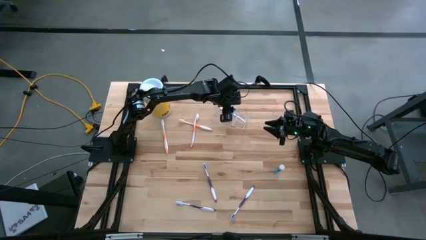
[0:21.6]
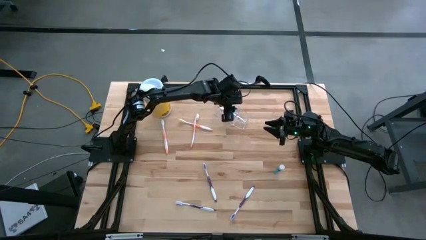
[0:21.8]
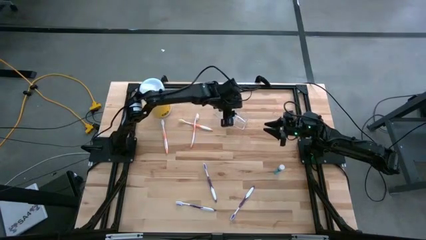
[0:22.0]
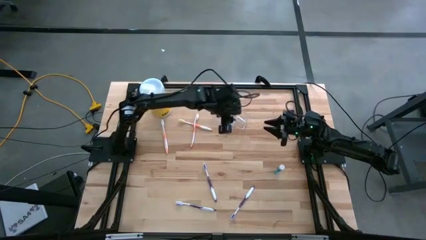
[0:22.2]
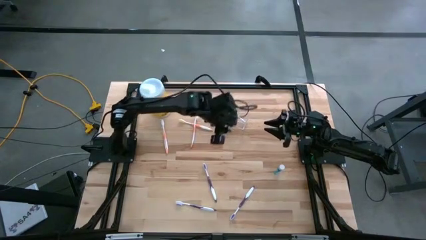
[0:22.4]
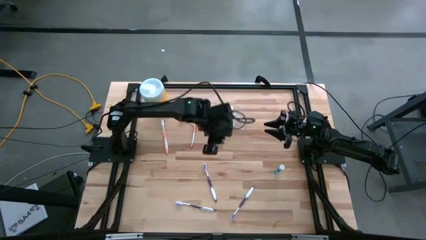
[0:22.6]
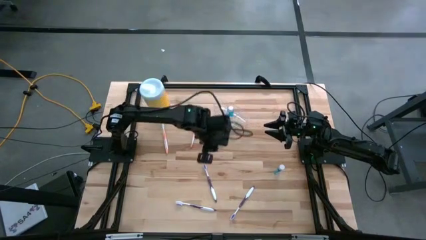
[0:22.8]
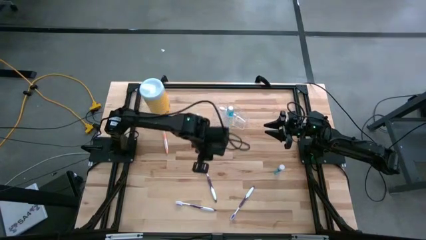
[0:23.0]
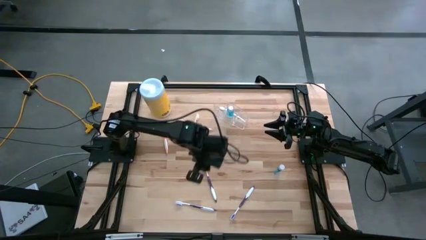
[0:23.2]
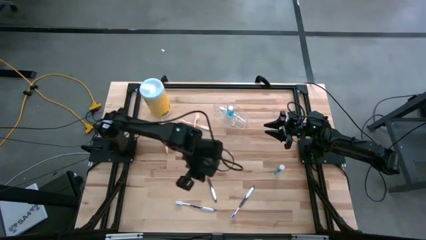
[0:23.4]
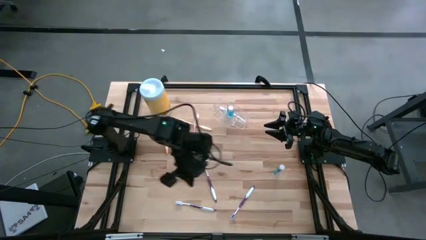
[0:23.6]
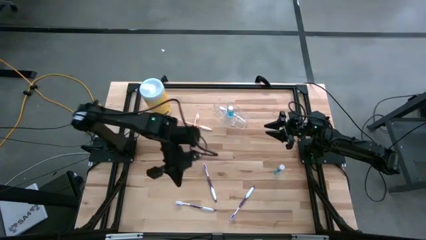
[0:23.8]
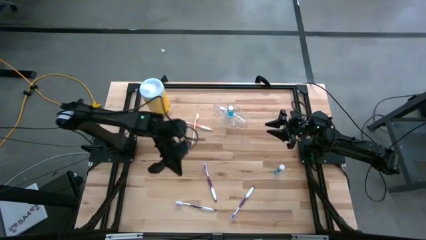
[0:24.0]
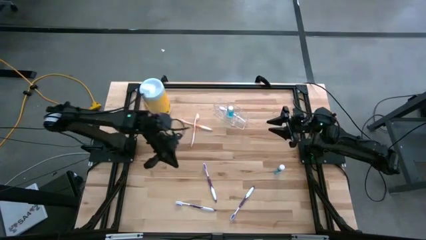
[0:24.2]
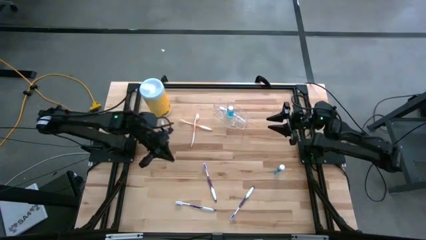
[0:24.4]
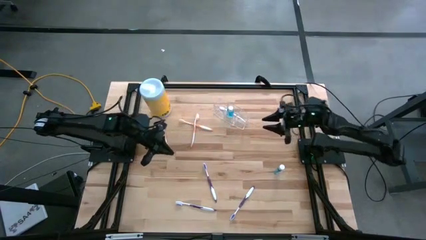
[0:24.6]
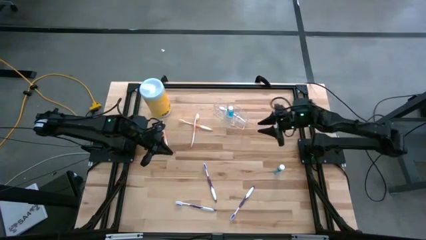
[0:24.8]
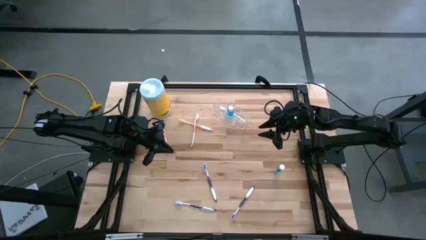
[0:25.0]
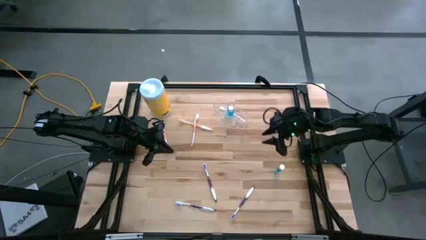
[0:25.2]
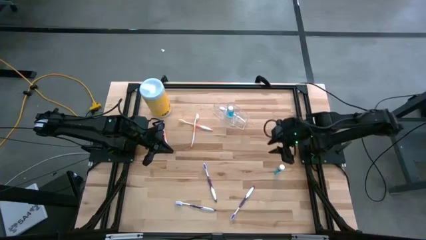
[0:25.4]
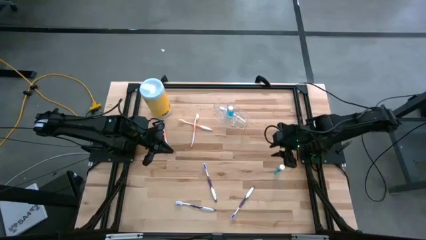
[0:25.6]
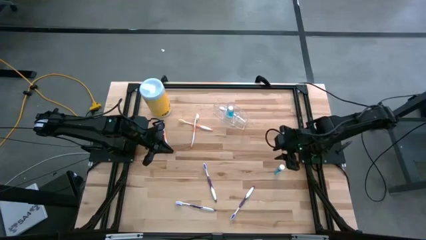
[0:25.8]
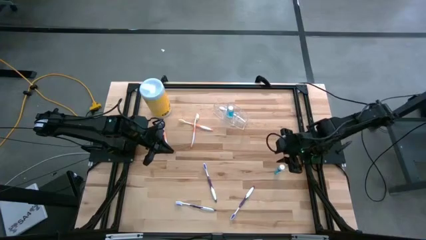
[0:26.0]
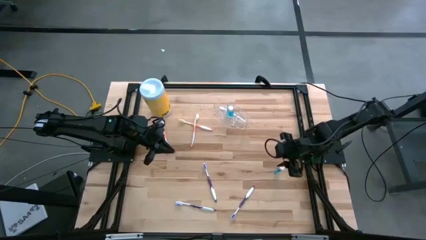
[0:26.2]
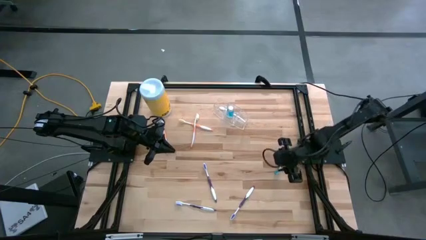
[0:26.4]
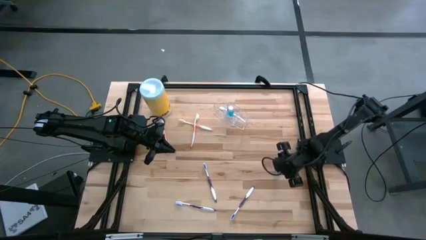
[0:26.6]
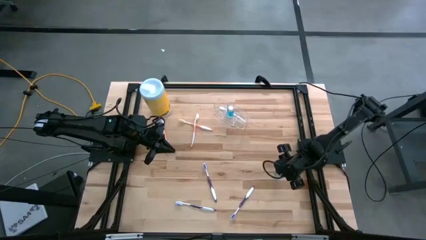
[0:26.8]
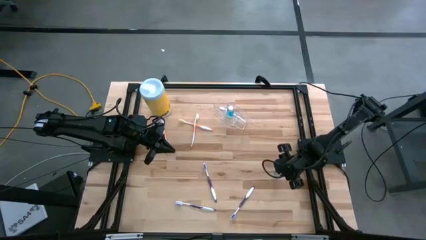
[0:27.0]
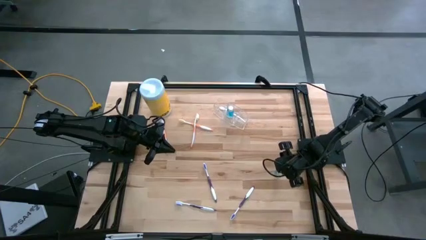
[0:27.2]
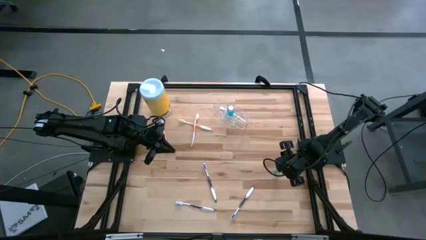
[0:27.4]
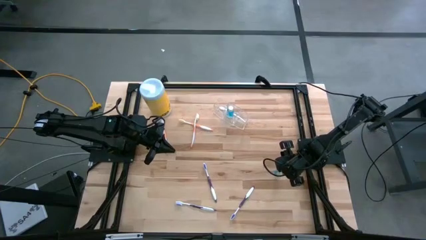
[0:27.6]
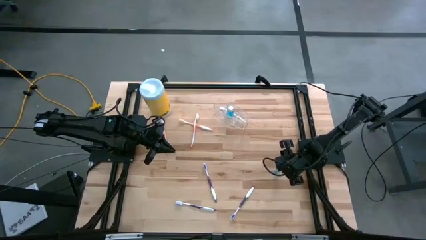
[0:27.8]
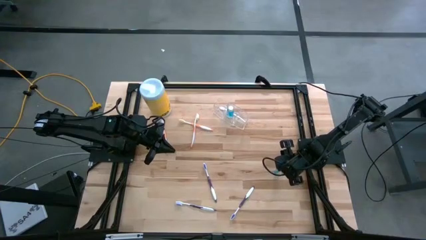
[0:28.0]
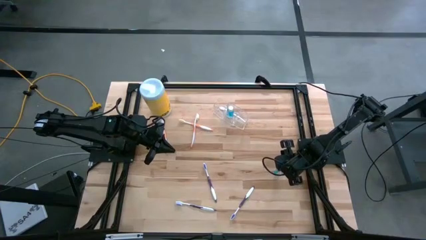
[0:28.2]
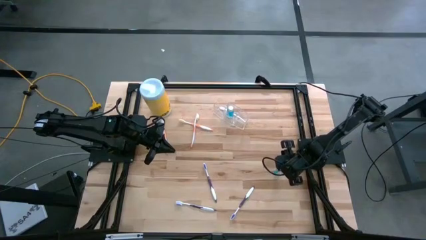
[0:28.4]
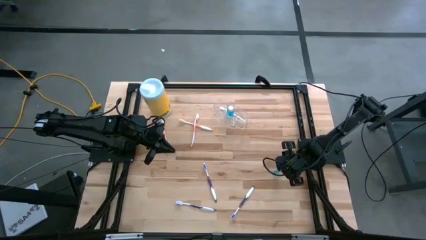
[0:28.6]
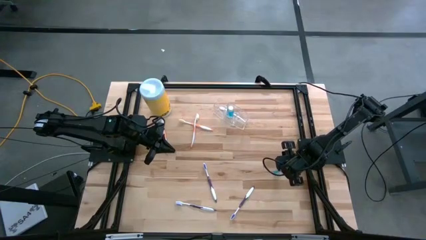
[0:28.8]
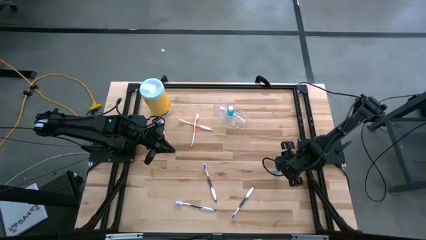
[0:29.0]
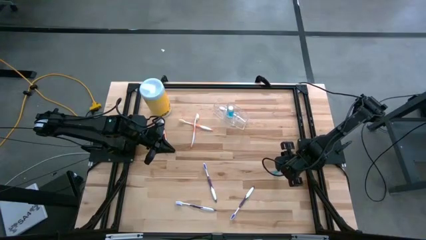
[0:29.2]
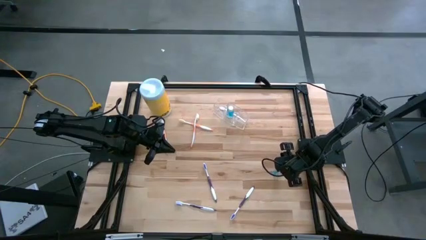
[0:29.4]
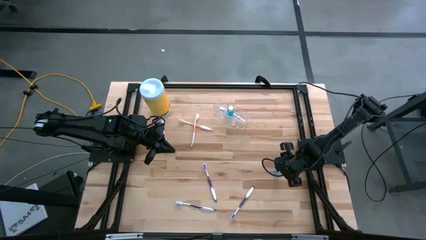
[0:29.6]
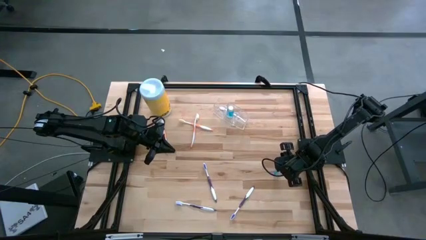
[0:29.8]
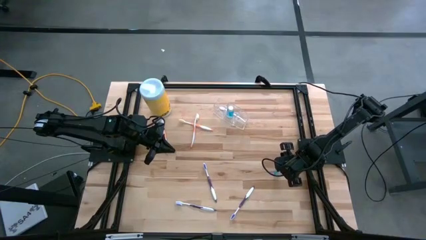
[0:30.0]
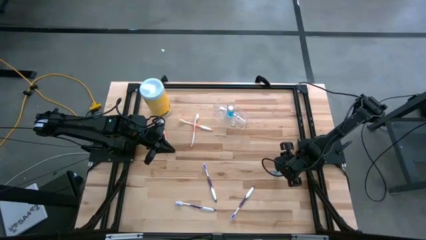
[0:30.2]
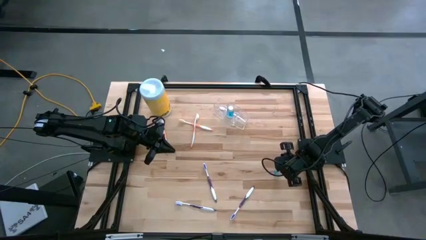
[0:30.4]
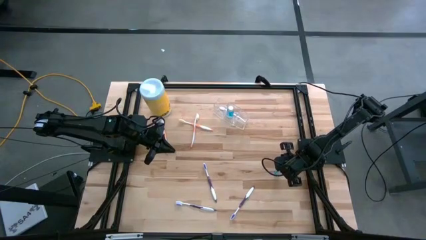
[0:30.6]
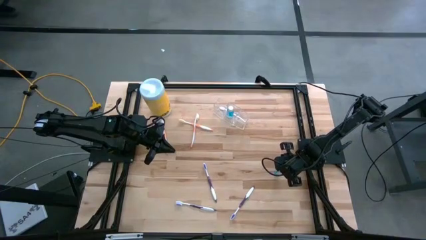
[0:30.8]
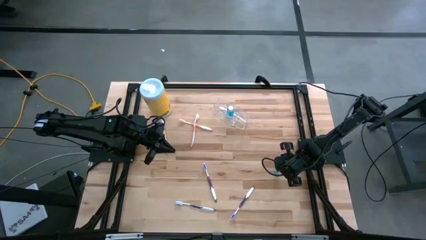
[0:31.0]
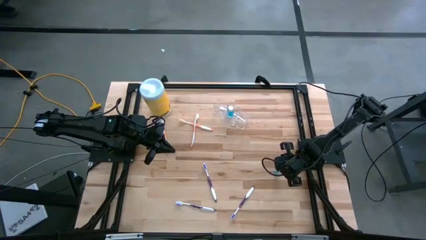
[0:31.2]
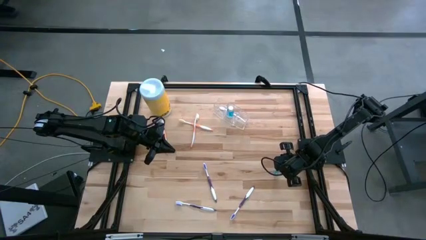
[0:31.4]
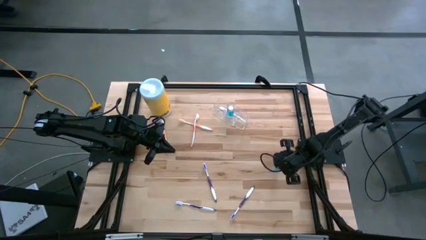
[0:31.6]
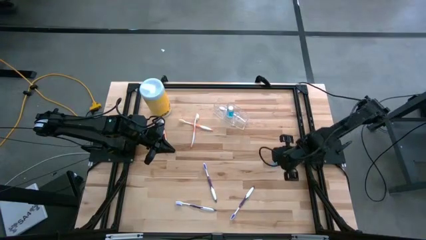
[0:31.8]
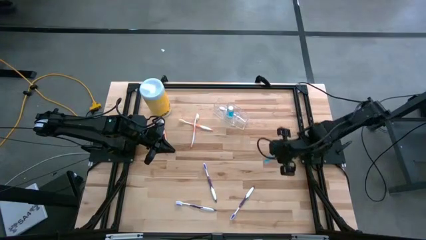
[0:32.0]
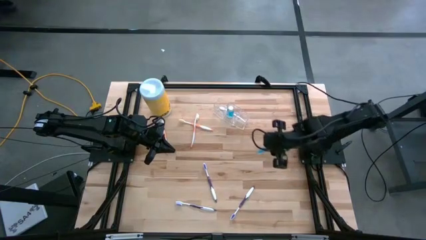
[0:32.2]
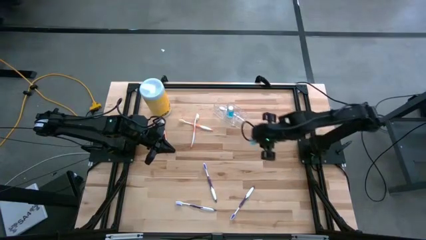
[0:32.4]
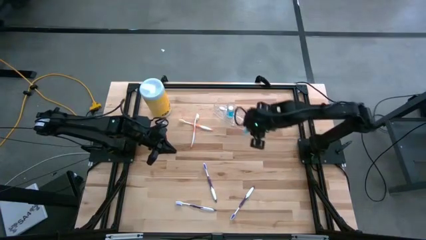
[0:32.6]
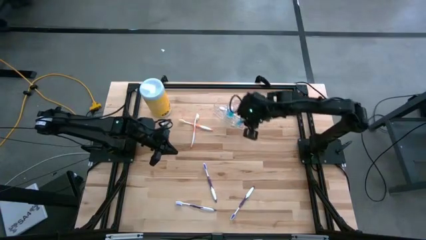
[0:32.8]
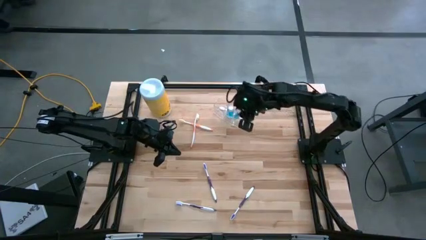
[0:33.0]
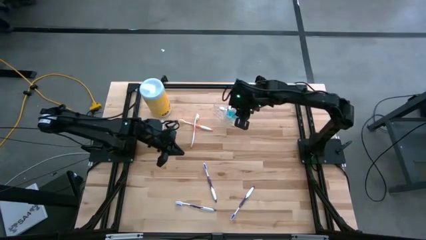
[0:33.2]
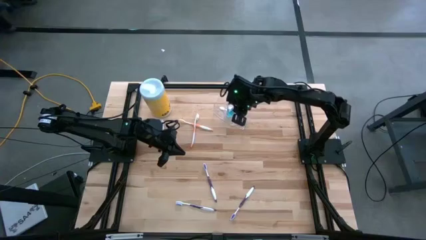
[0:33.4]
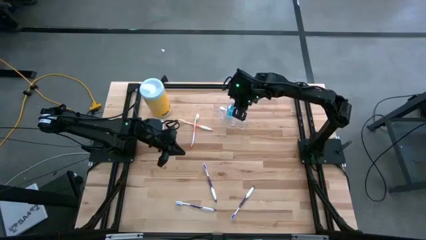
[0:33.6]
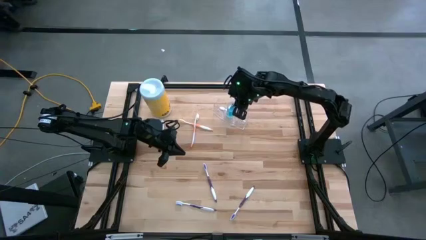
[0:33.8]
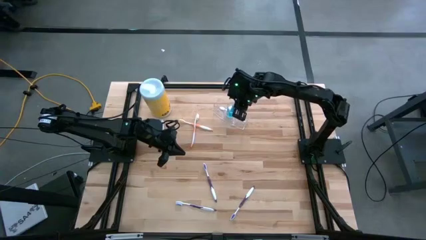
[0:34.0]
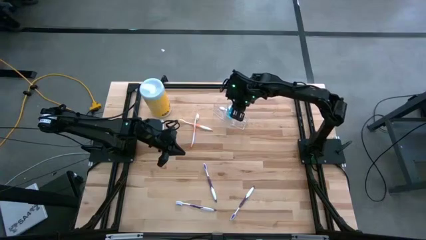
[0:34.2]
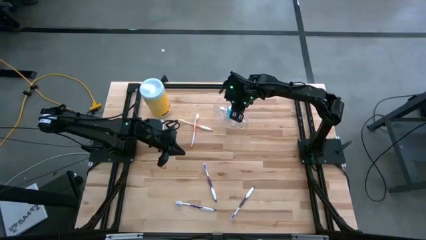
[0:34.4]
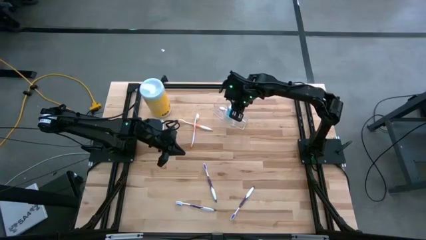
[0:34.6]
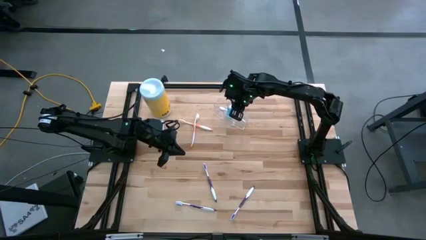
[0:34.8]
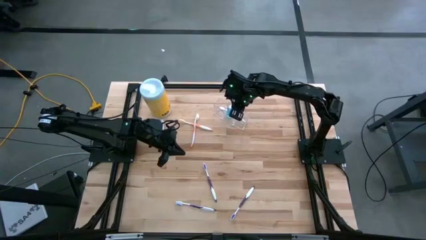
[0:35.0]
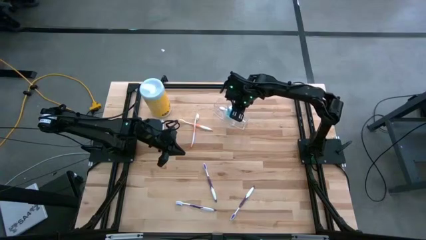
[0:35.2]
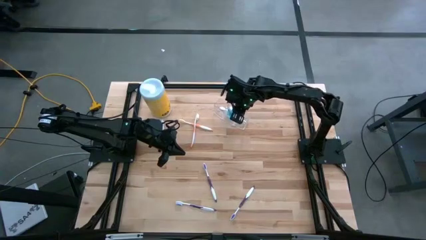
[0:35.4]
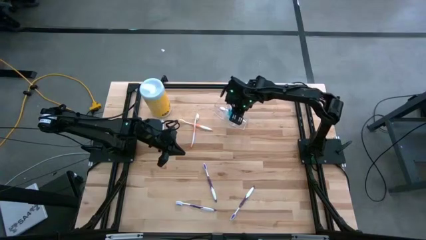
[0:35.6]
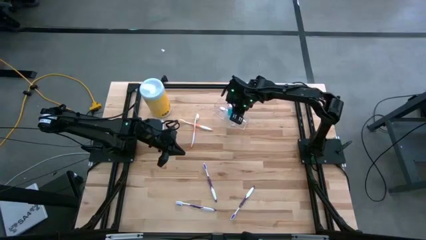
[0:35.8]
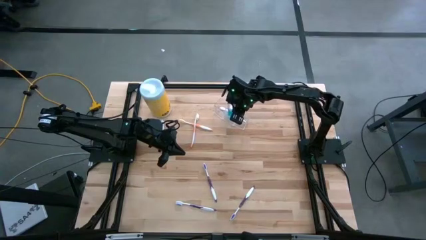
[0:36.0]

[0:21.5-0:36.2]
Task: Pick & Place toothbrushing station
Put the mouthwash into the transparent organizer
